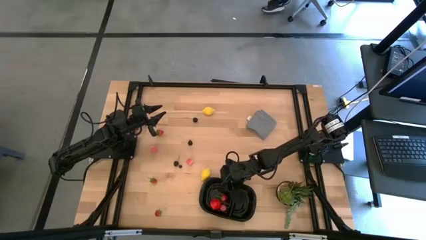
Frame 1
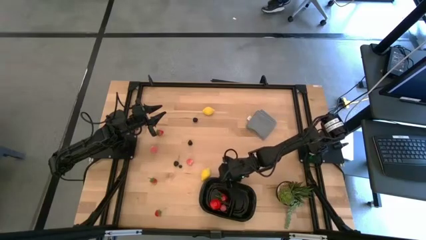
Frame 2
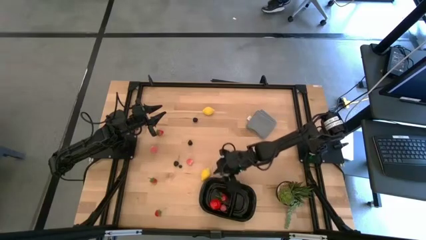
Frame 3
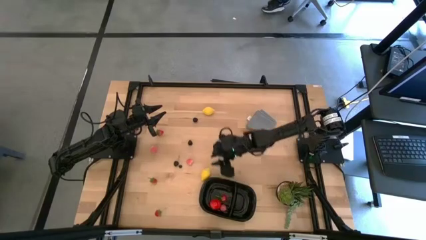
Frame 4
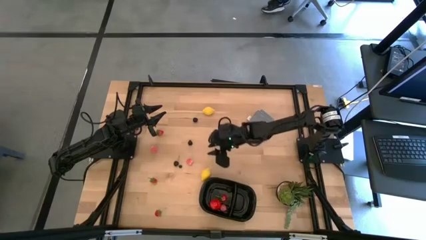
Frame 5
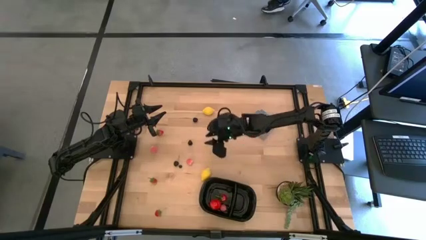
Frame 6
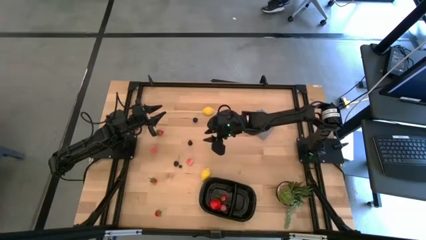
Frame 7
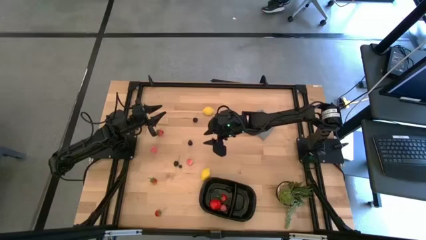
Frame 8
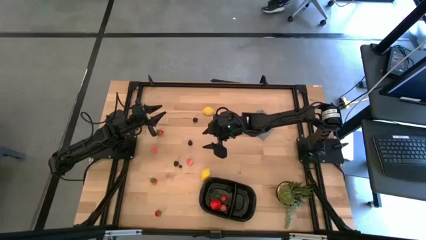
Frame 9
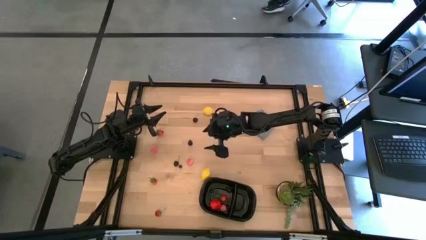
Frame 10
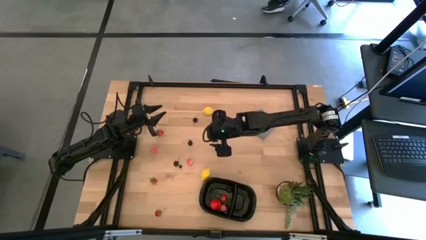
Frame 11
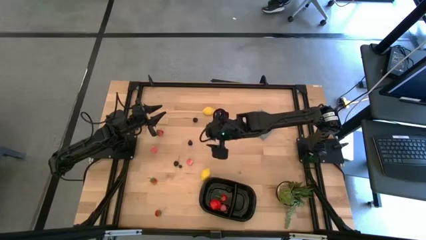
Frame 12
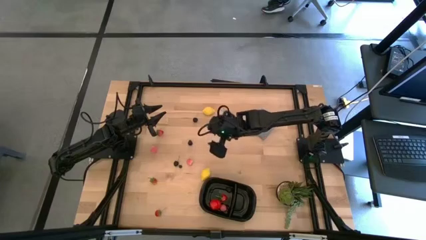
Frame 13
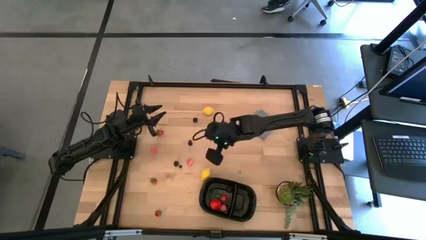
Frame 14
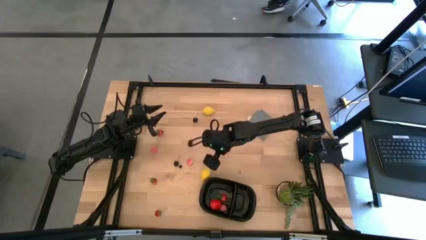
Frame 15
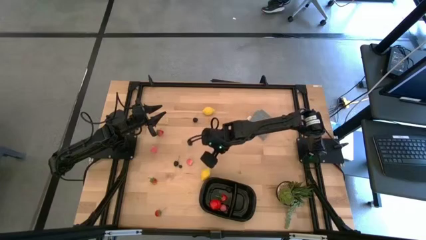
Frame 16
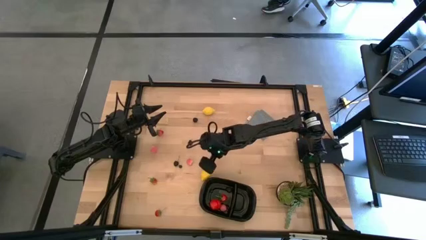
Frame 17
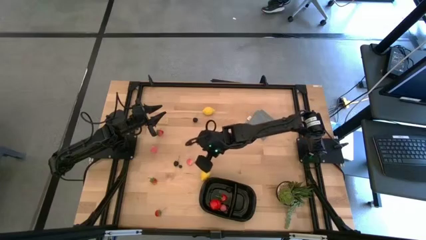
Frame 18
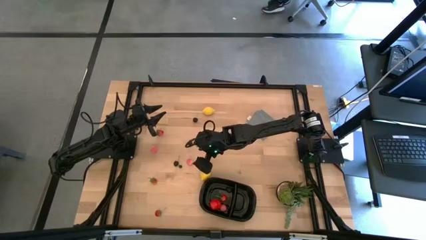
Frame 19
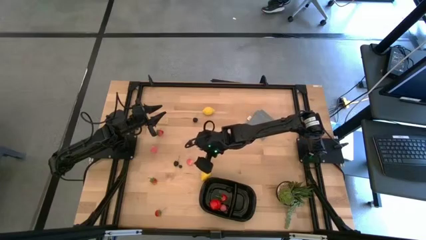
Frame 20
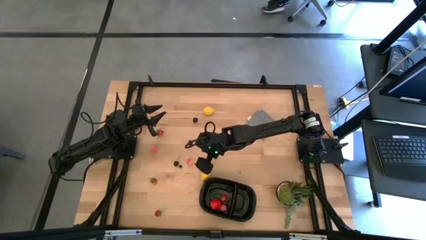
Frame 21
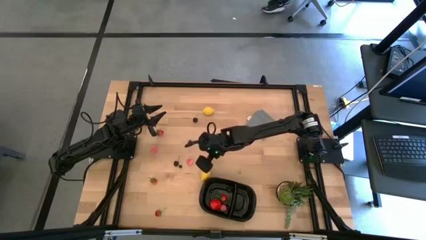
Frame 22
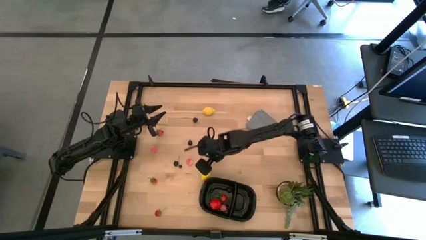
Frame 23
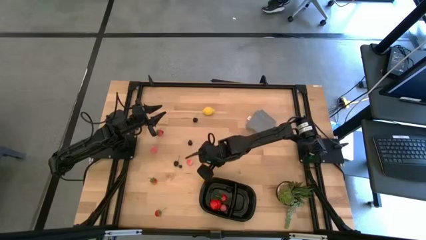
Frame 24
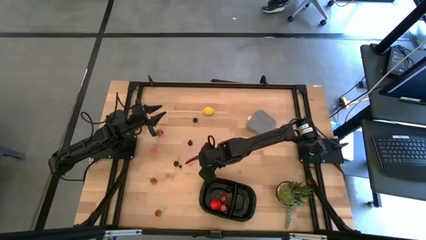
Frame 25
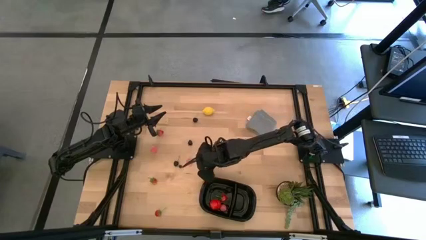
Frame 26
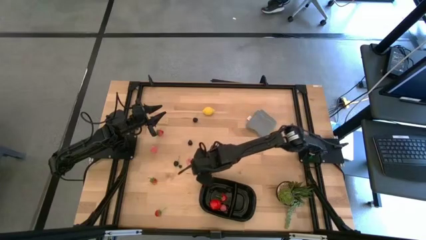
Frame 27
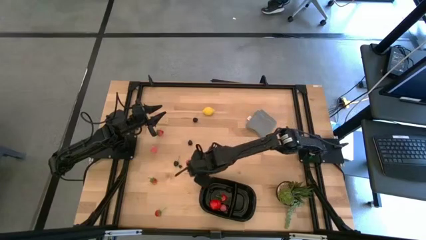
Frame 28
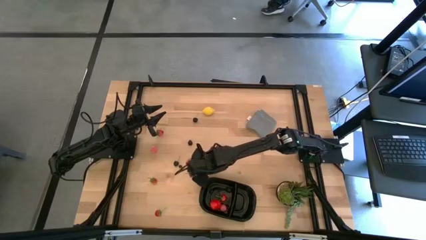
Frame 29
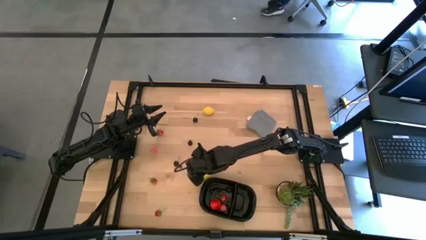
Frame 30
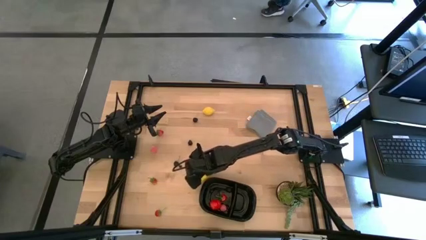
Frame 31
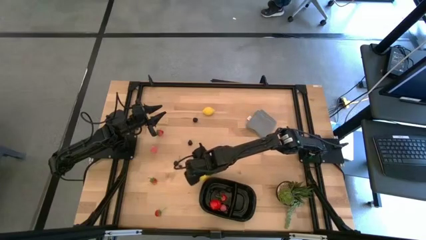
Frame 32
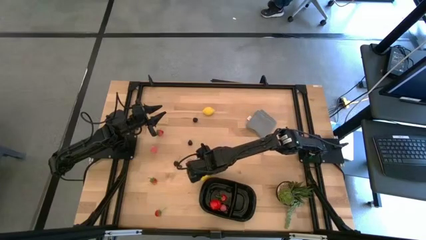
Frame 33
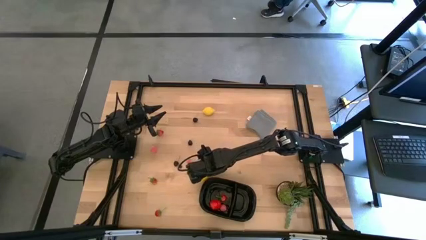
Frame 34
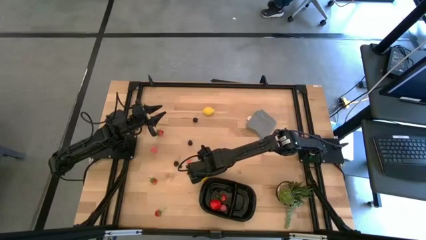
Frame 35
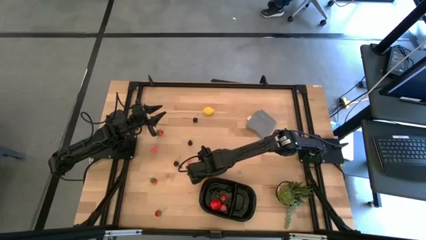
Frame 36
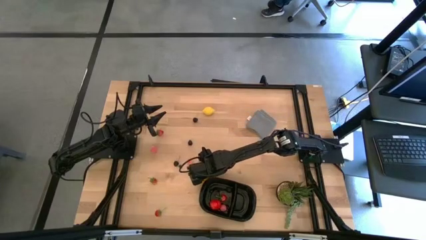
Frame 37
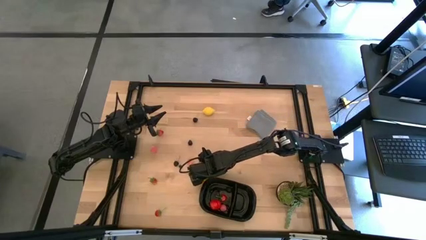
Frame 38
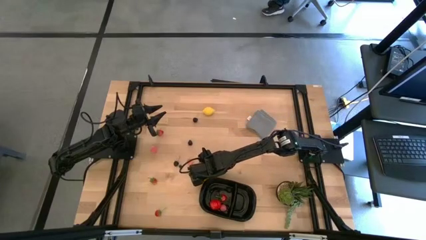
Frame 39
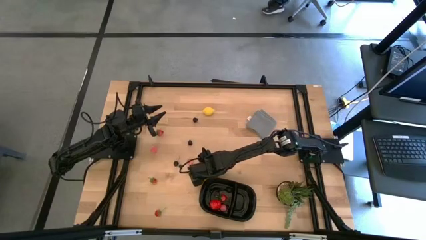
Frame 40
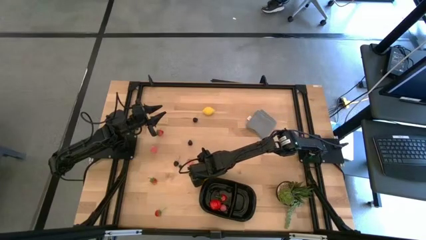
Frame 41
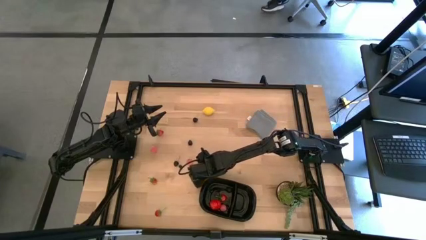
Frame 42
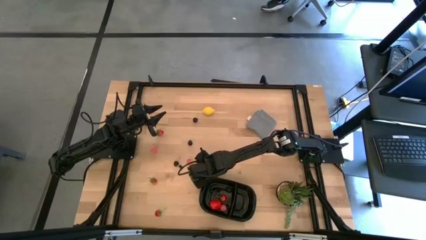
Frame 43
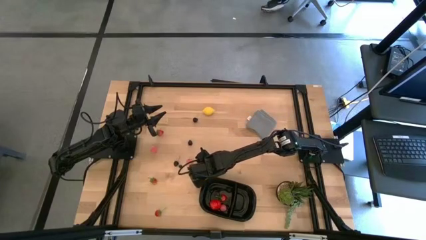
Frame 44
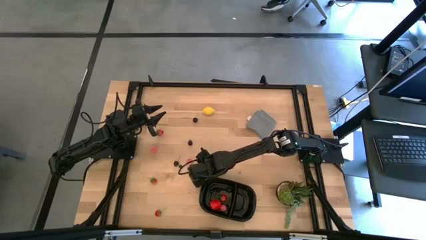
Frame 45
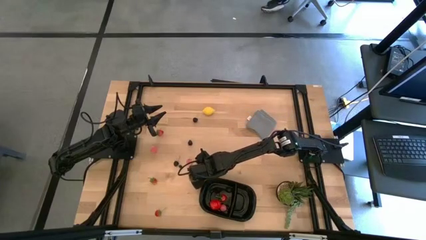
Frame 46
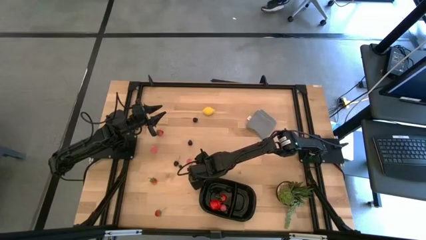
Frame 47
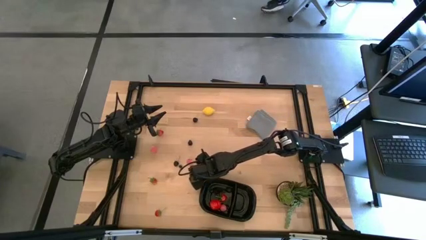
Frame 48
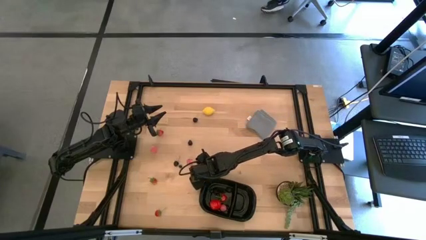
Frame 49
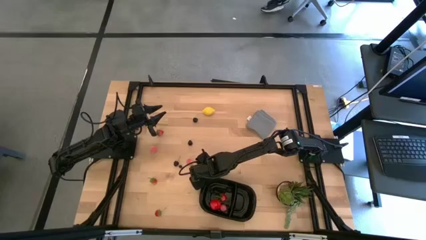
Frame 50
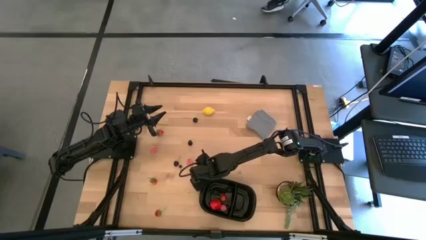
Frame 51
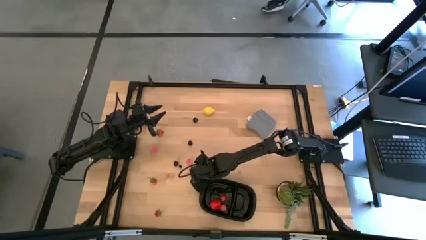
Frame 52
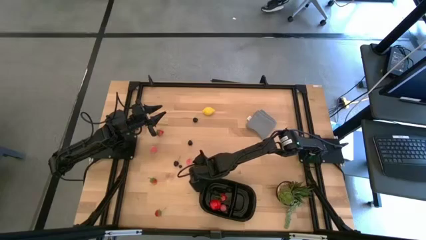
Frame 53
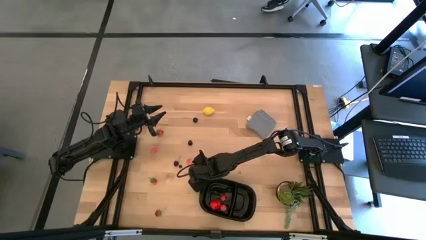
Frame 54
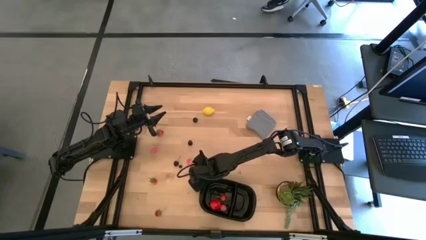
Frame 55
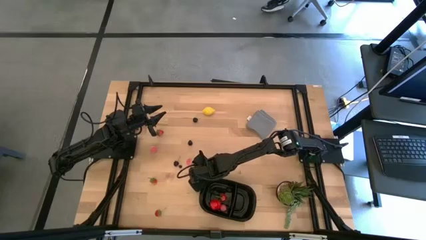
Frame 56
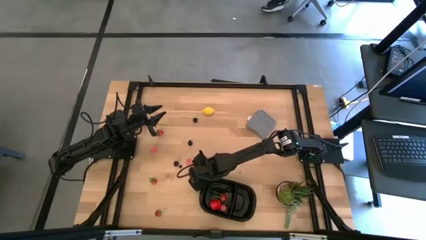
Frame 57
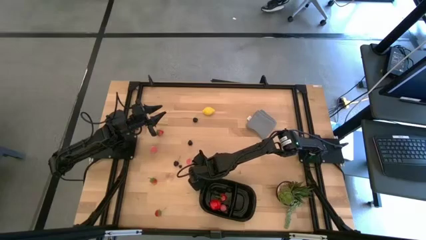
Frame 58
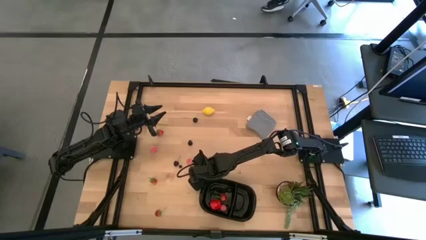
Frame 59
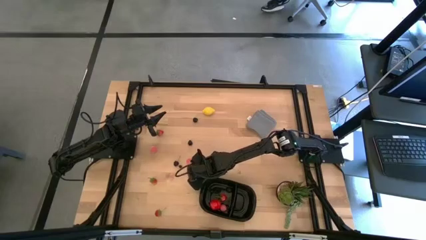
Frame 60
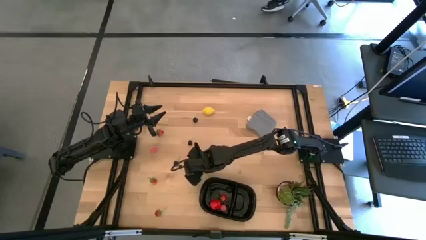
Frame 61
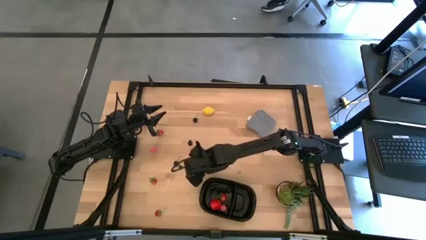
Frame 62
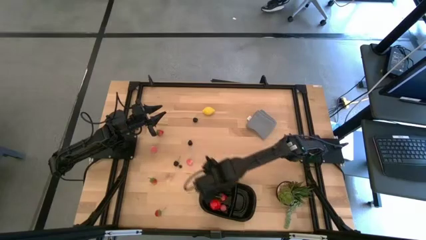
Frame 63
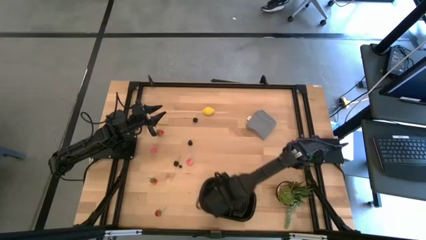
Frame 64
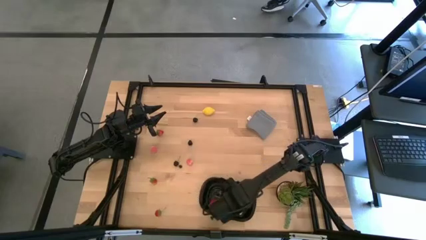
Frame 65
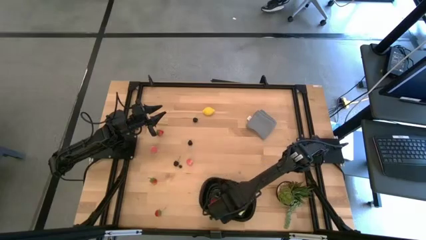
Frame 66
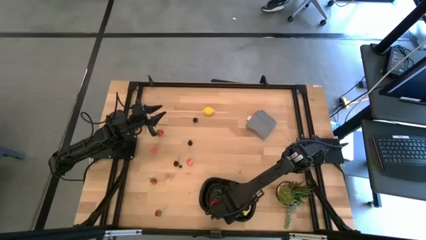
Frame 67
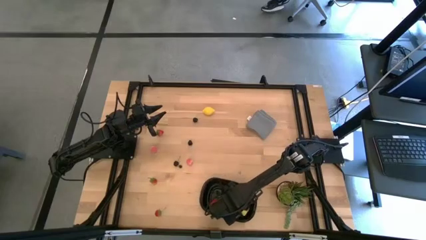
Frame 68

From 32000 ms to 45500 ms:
Task: Pick and placing Produce into tupperware
Put the lemon into the black bin
